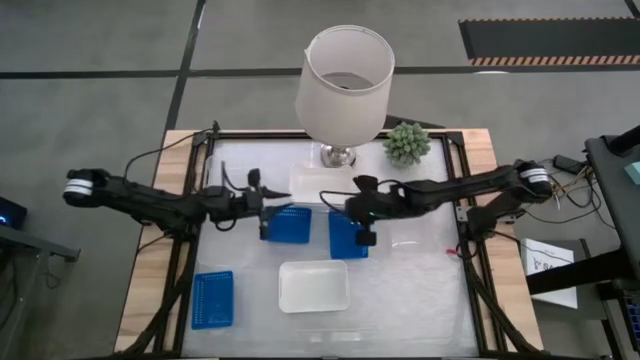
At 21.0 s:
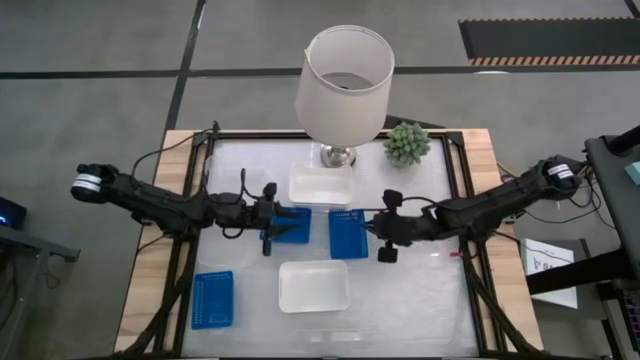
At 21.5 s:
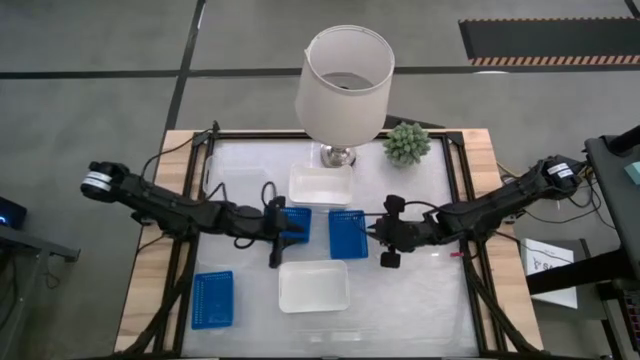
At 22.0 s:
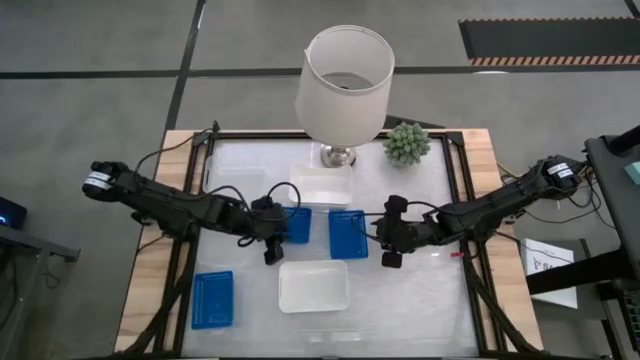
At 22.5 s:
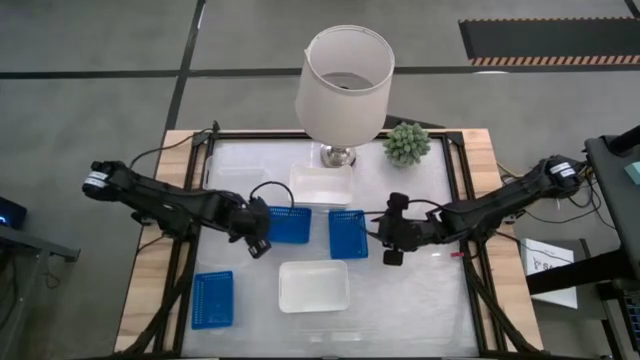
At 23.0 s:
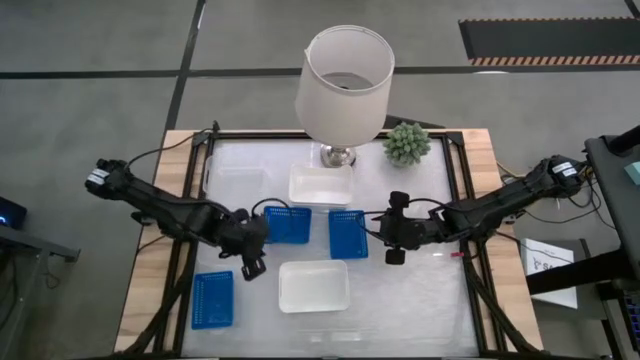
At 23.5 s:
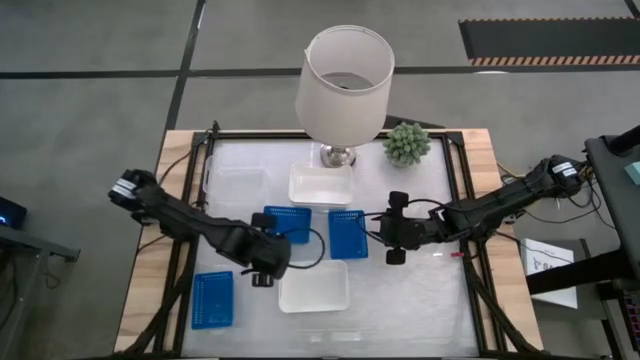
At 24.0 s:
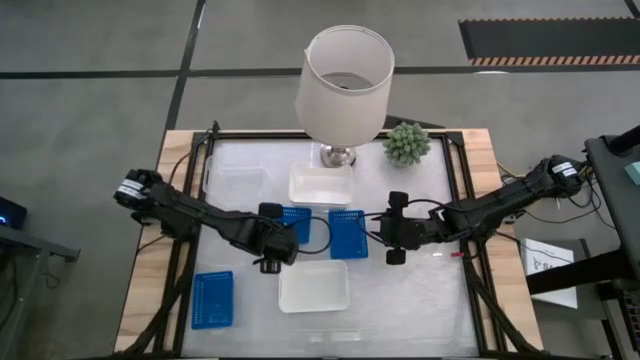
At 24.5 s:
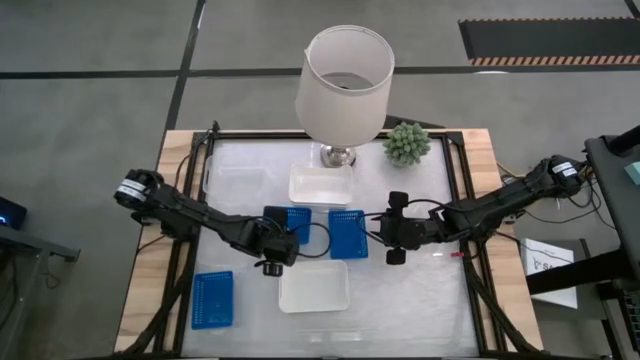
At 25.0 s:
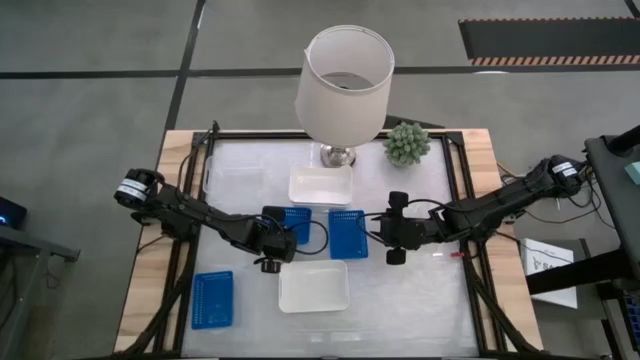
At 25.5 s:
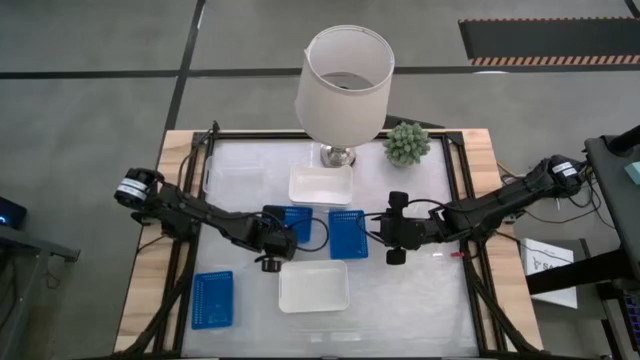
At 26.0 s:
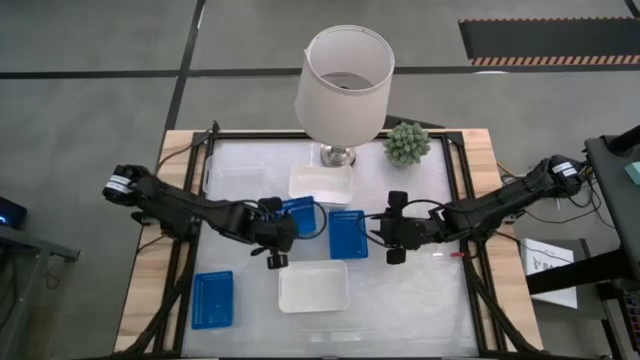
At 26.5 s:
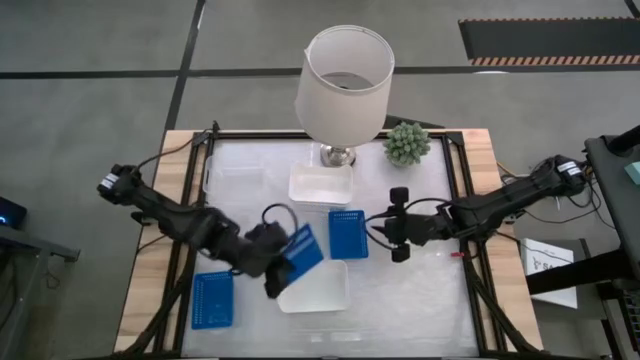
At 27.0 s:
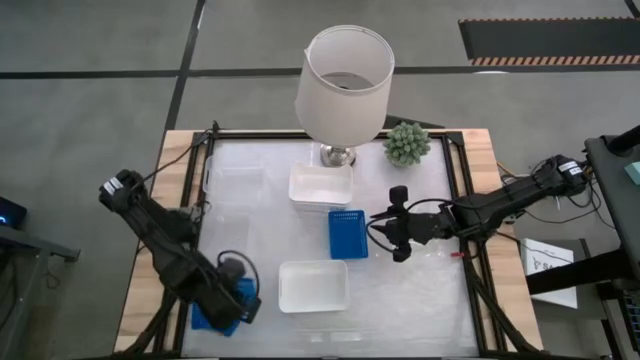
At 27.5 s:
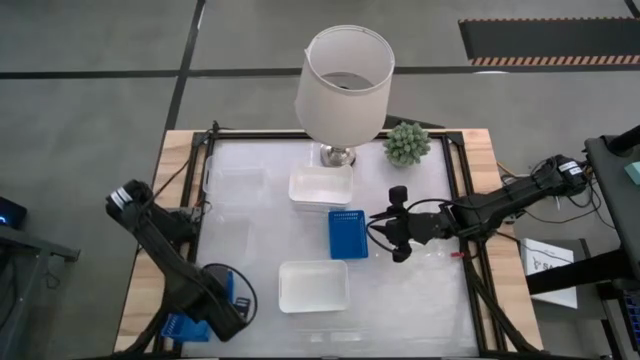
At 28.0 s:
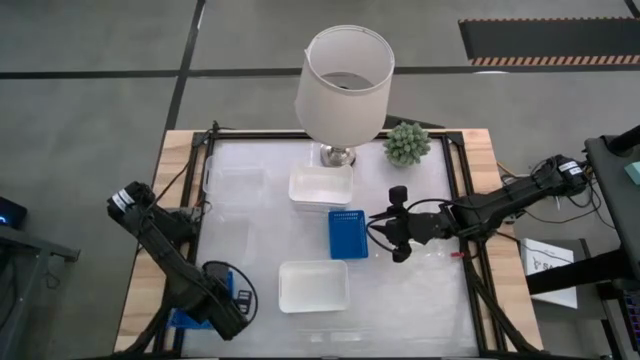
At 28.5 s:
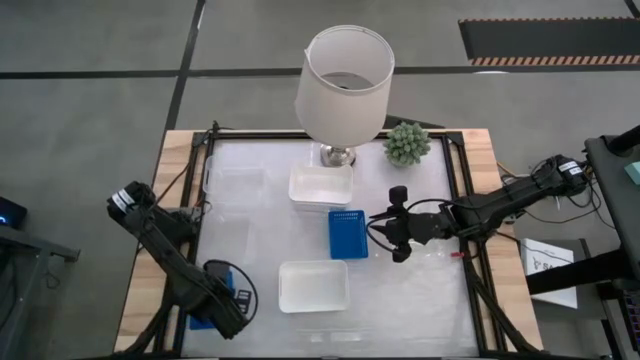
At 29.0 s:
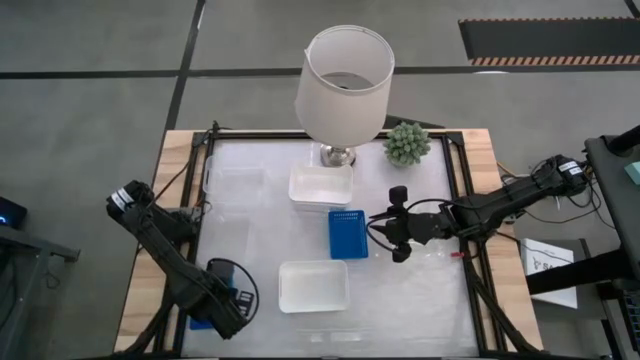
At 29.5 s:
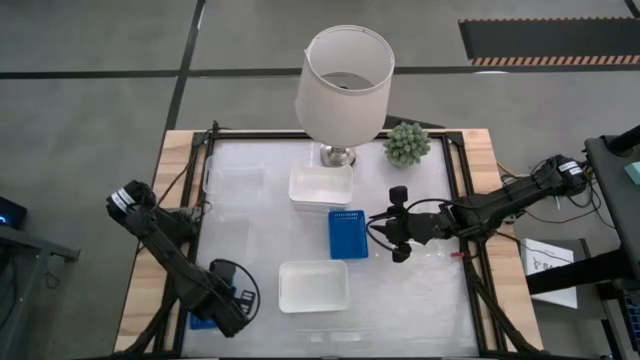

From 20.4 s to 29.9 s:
Stack the top left blue bin into the bottom left blue bin

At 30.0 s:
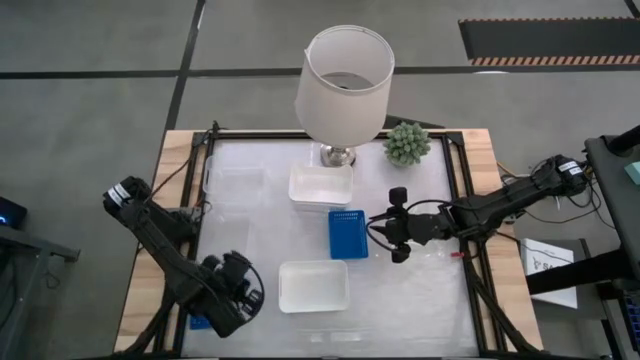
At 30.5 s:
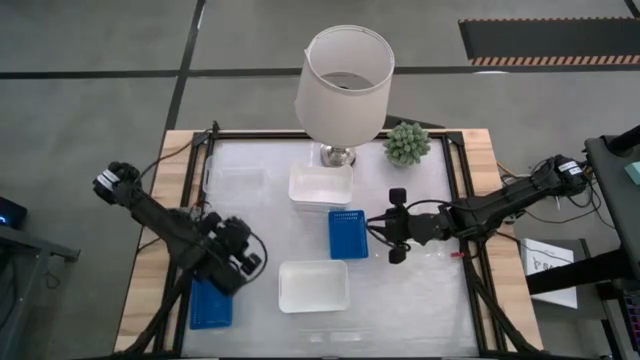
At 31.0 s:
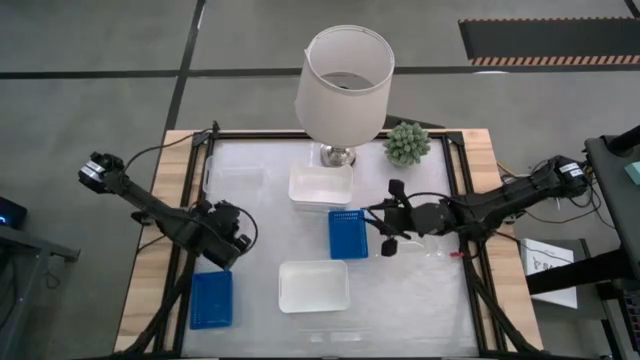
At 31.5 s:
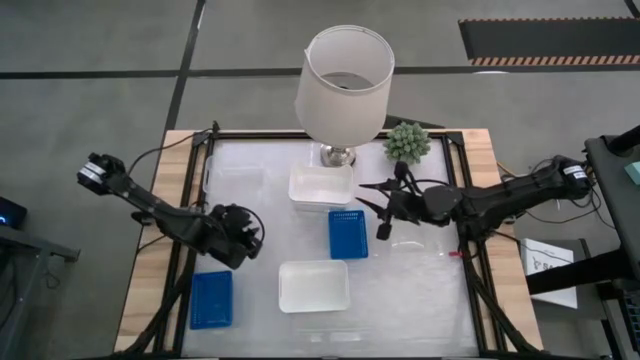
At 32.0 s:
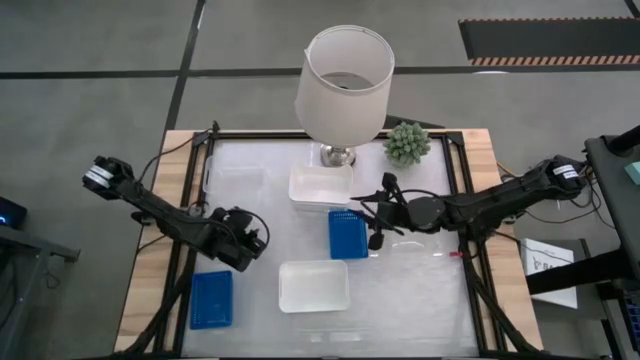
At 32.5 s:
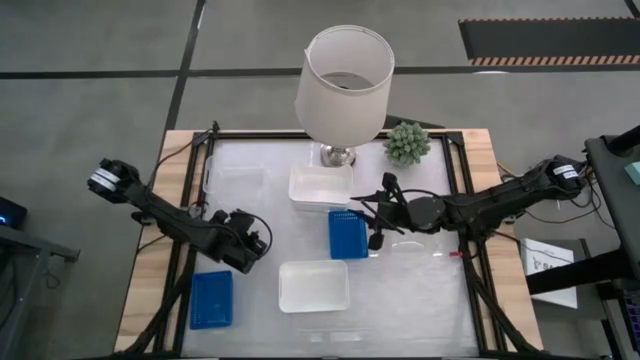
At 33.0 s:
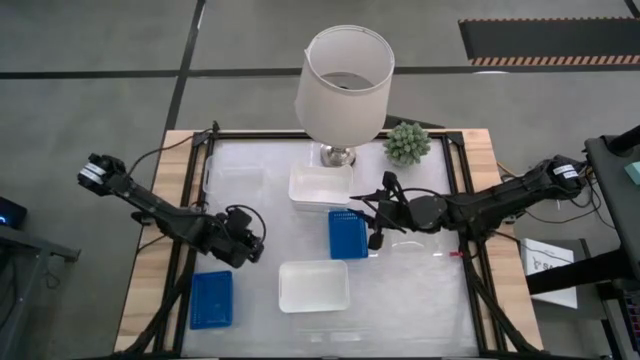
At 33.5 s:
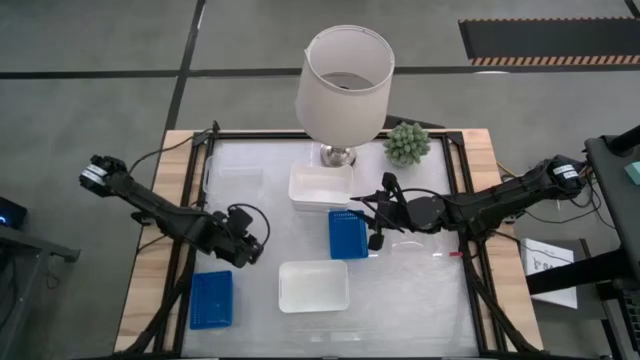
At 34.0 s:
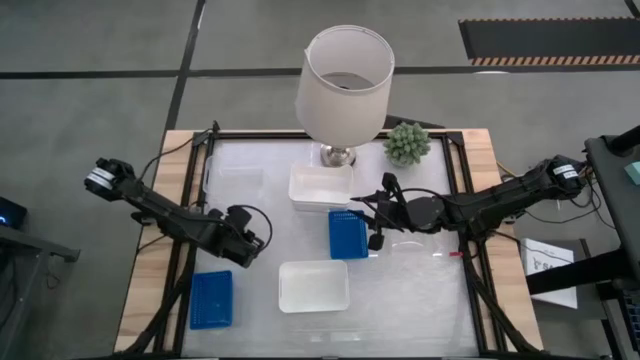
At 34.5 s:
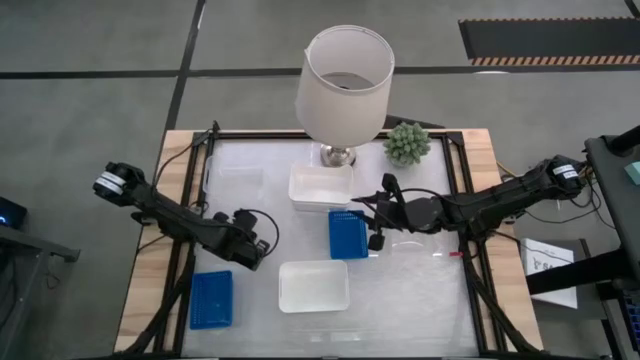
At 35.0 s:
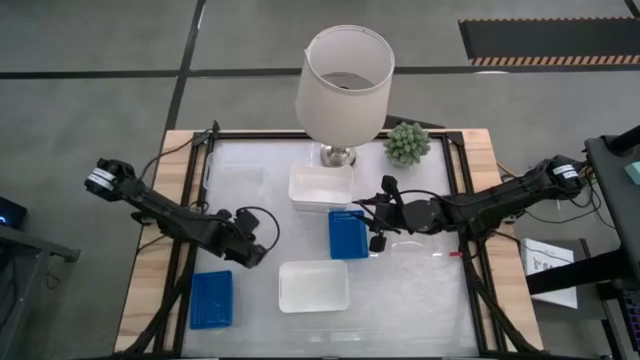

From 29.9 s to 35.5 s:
Stack the bottom left transparent bin into the top left transparent bin
